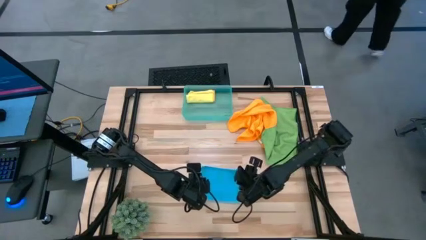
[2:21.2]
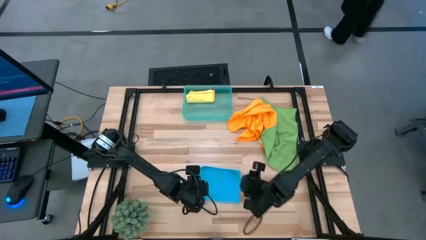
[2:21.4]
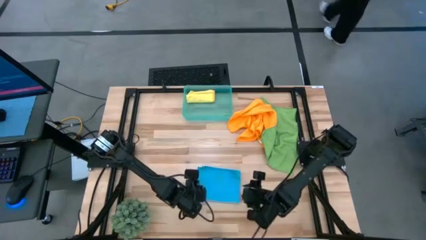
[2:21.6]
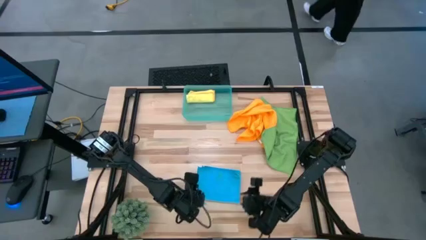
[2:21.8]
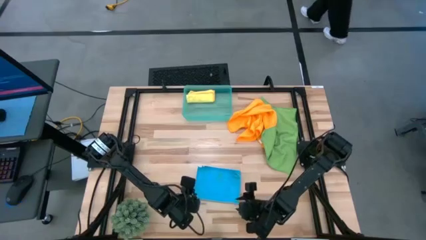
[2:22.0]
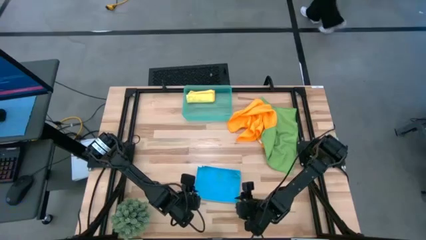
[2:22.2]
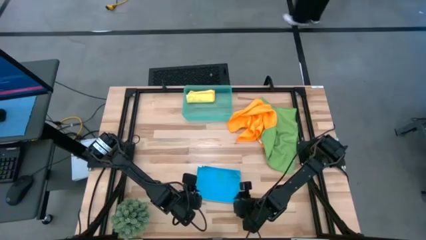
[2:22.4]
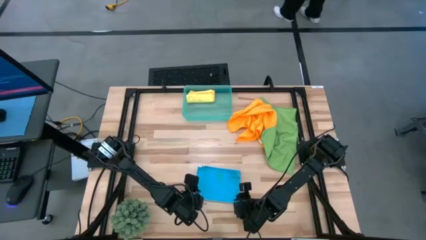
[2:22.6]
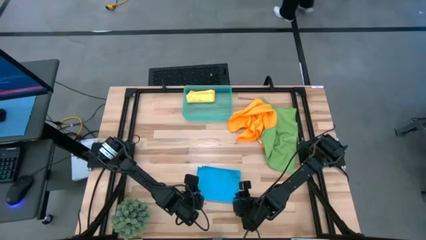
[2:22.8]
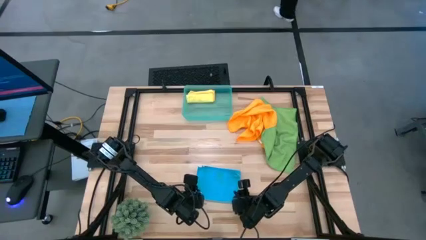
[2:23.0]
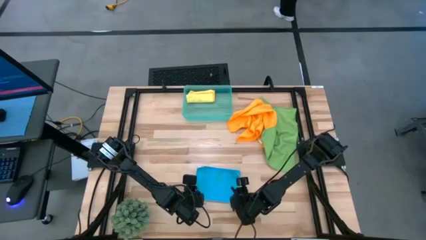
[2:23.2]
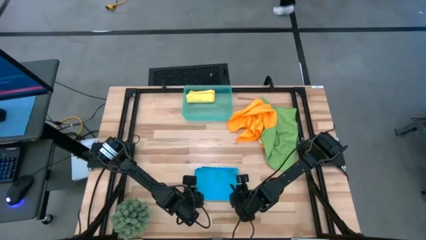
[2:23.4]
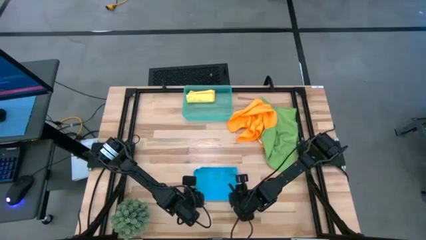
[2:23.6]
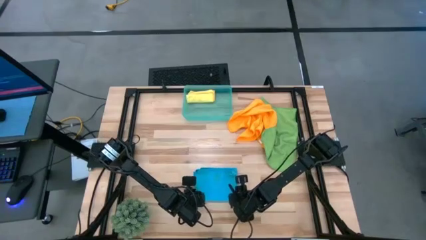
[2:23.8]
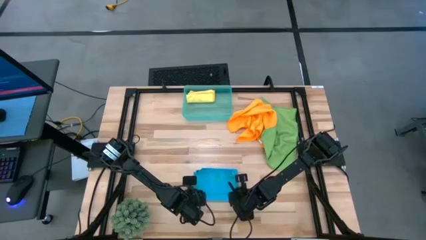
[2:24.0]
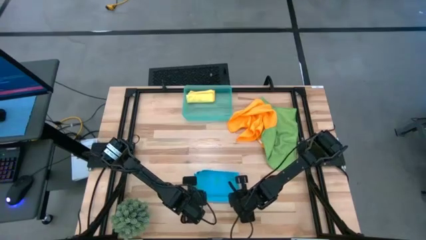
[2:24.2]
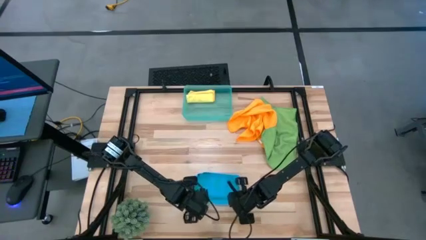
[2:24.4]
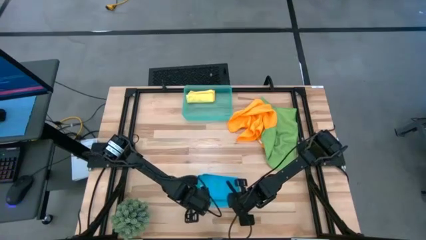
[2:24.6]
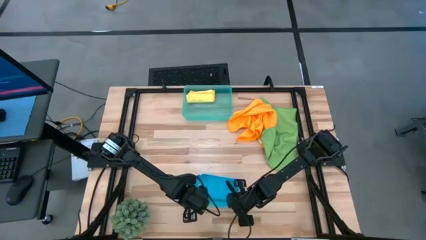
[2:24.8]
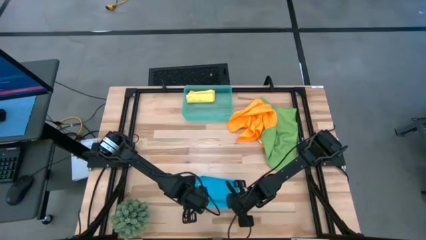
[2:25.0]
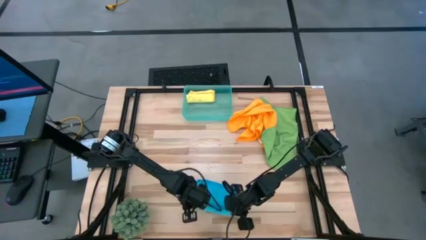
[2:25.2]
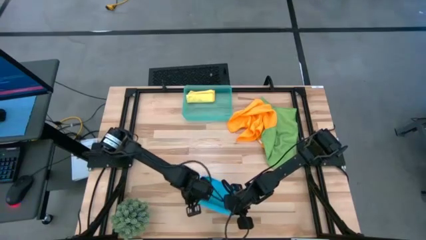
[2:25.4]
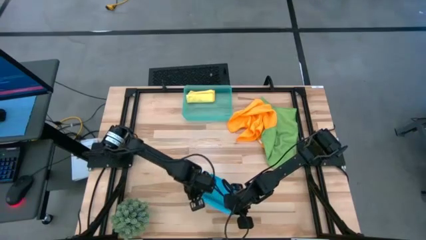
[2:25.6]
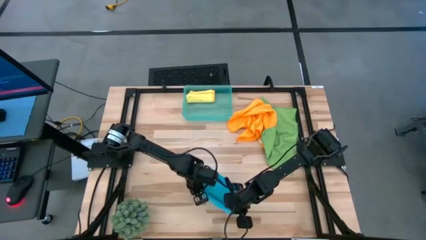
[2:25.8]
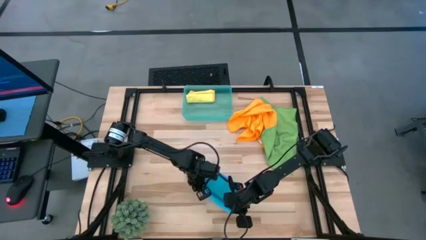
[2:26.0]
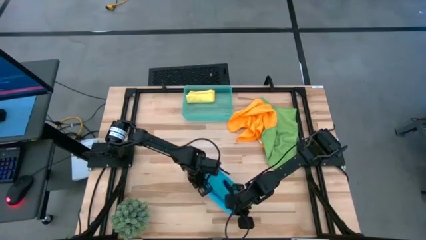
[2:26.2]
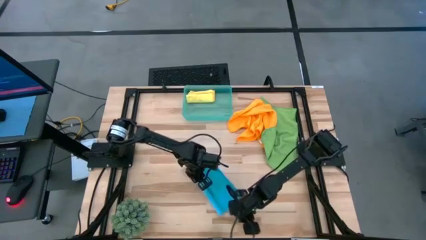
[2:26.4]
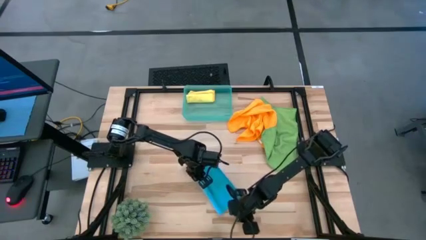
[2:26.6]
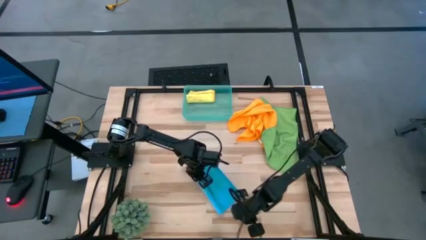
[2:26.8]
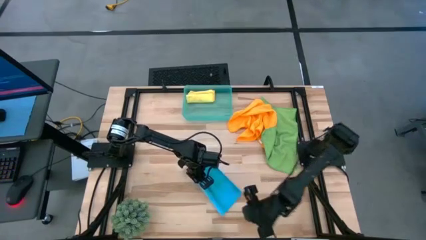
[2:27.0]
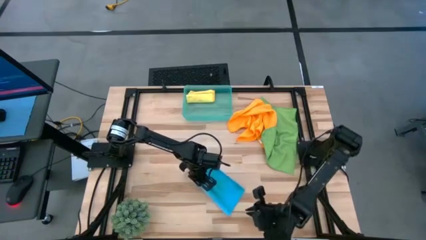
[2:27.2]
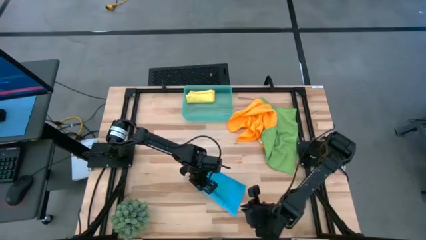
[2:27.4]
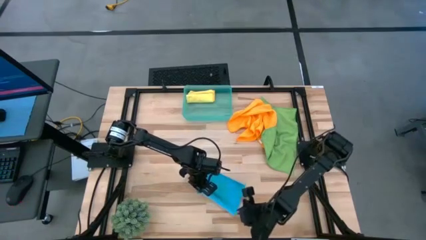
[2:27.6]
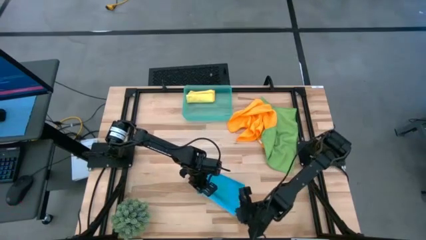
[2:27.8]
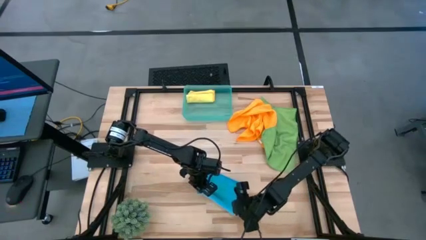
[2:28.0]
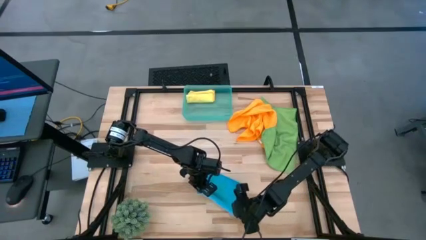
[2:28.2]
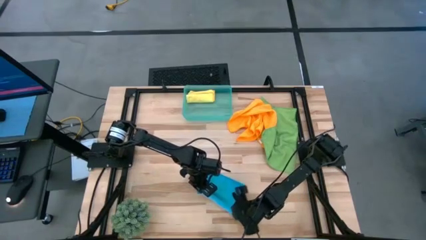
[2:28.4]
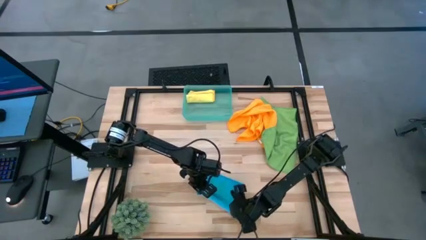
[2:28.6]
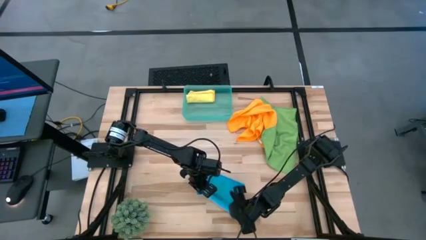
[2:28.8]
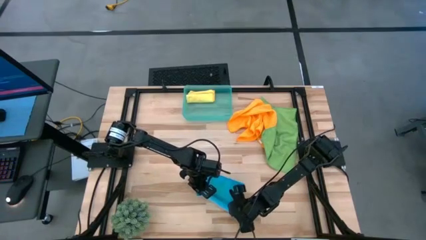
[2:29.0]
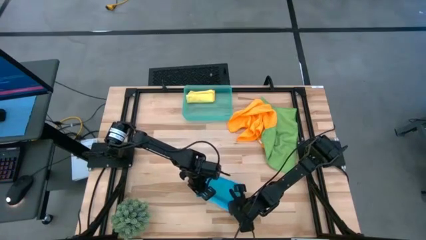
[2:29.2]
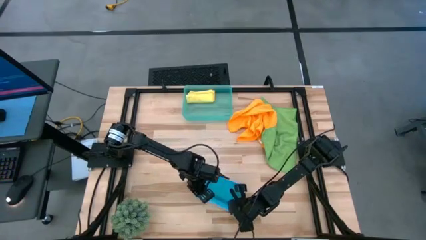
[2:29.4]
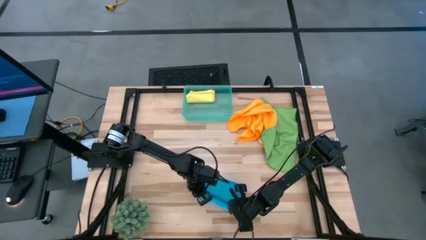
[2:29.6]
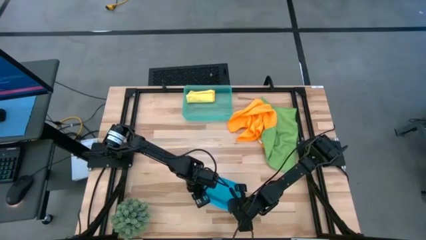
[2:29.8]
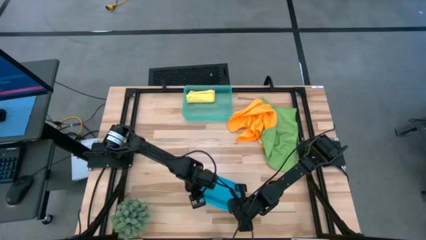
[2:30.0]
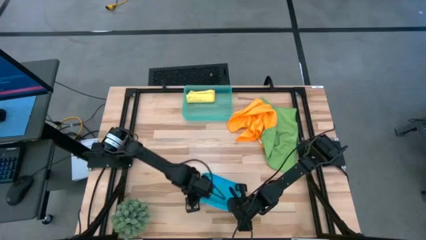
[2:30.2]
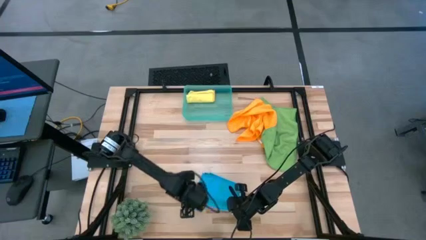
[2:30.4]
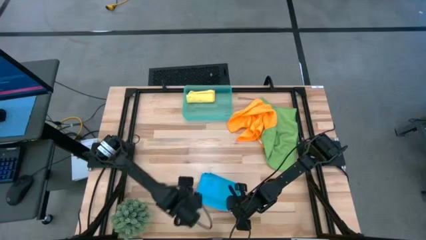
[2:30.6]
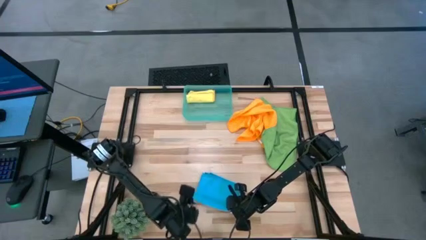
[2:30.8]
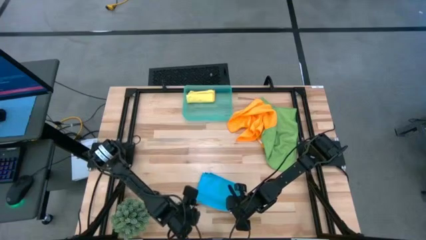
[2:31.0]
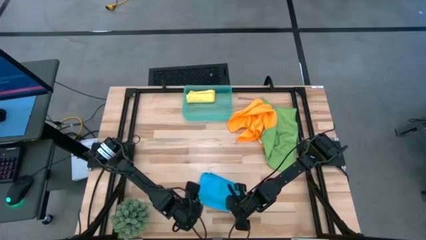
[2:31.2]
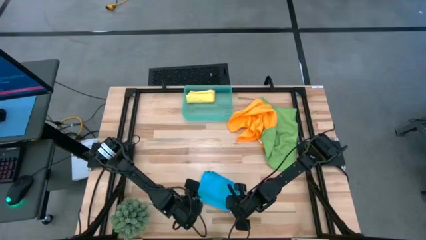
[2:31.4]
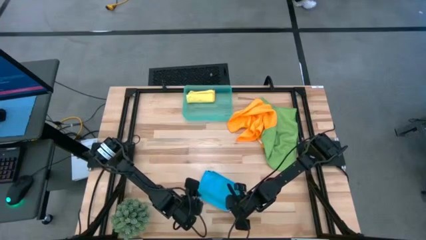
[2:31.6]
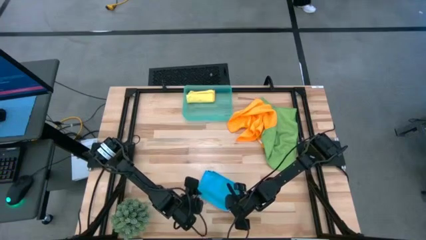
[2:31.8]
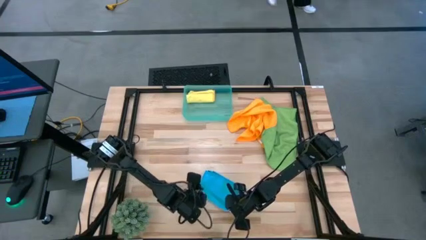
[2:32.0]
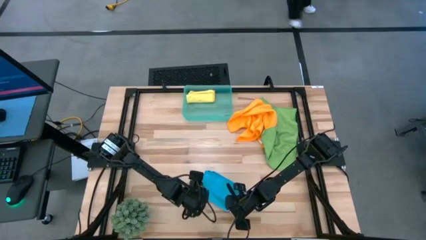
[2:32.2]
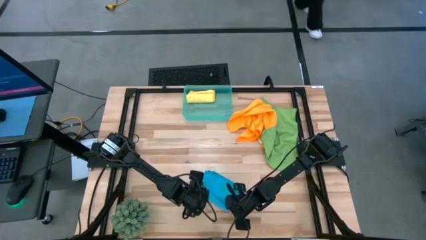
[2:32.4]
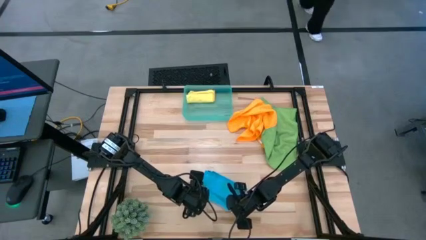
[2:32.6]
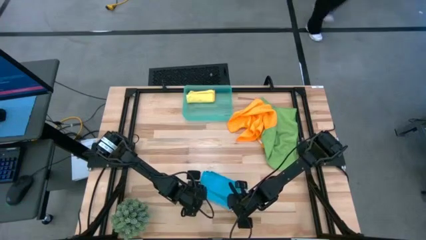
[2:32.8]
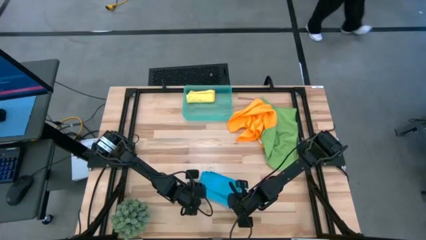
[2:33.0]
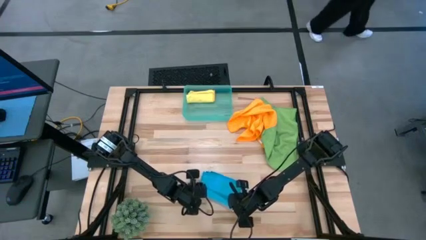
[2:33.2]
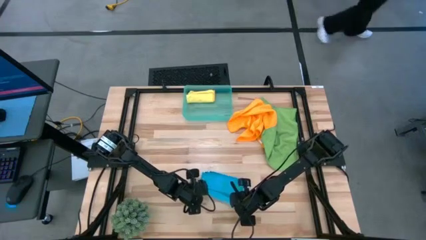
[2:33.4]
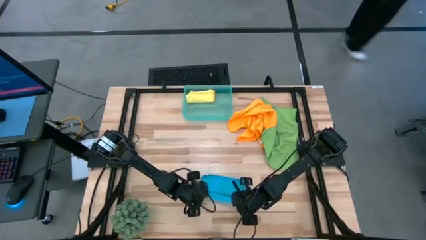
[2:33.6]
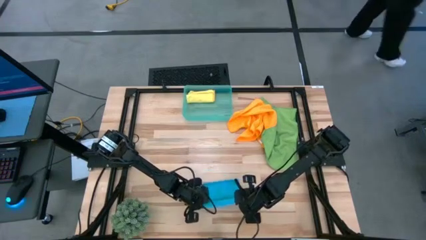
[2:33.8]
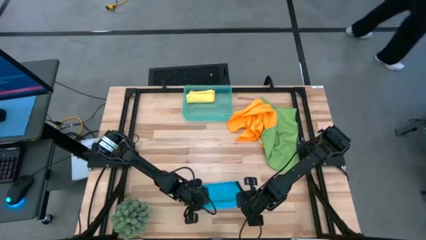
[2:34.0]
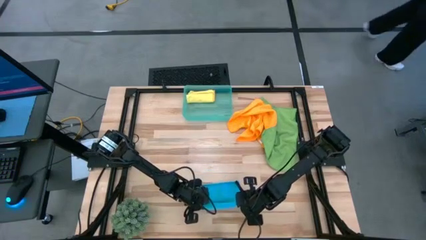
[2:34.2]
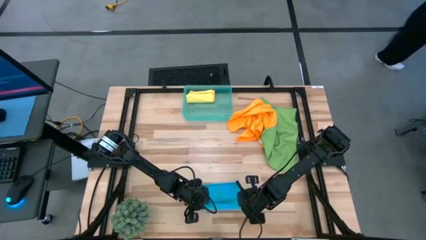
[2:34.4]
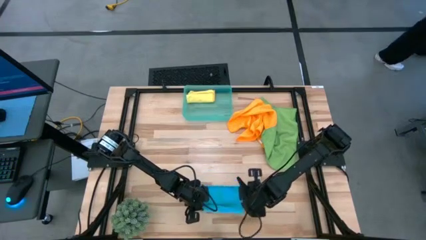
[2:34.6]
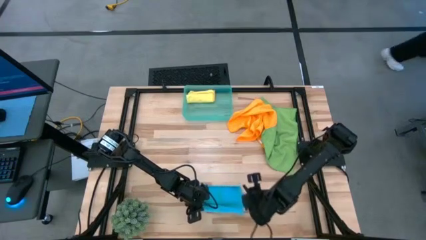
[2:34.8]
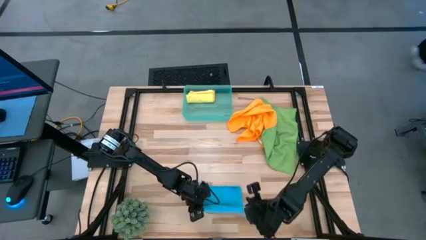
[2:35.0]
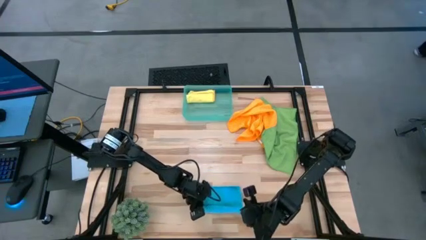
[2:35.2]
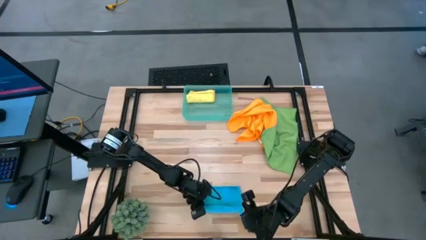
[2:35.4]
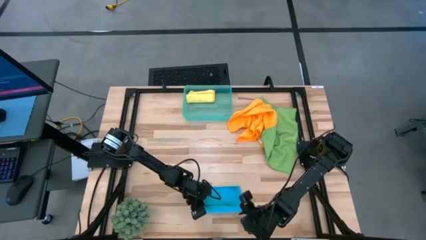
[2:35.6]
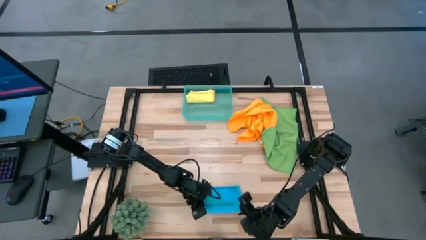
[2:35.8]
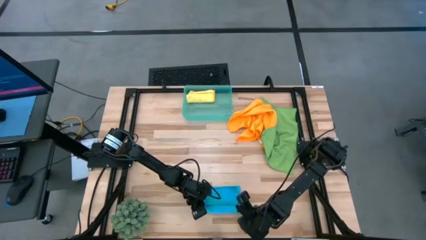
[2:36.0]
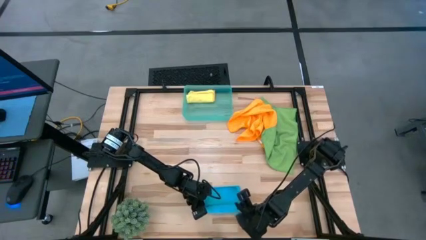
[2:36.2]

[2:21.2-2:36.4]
Task: Roll microfiber towels into tight, uniform cylinder then place into a basket
Roll the blue microfiber towel

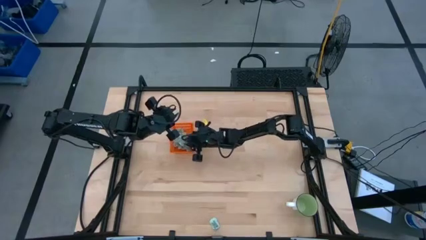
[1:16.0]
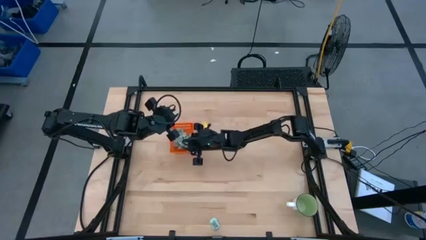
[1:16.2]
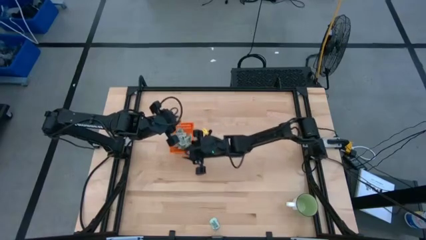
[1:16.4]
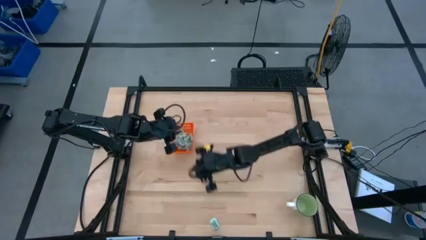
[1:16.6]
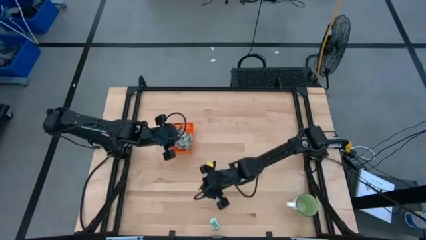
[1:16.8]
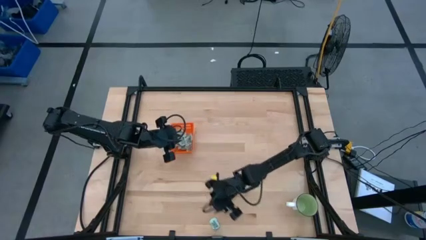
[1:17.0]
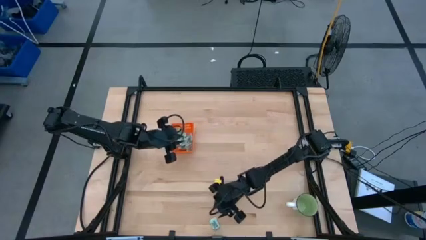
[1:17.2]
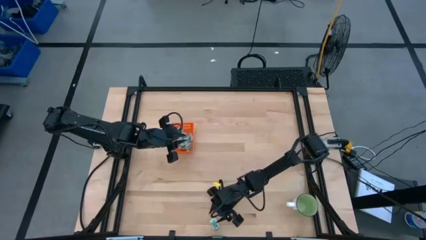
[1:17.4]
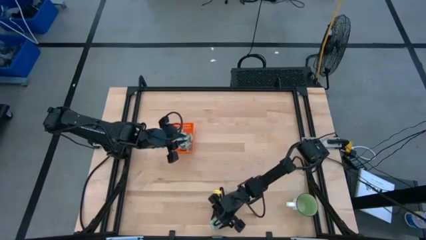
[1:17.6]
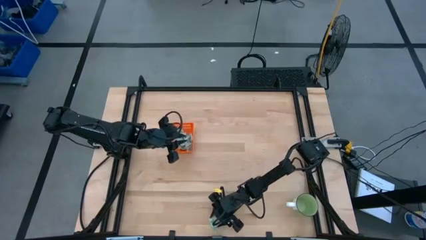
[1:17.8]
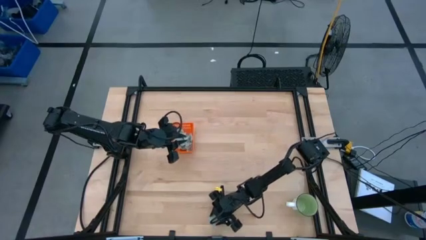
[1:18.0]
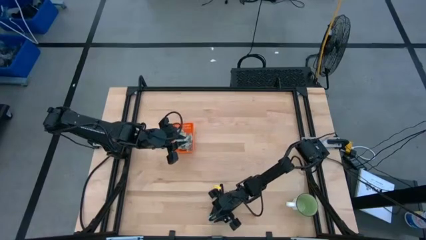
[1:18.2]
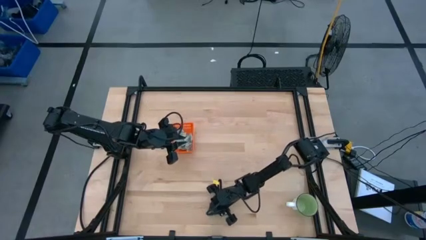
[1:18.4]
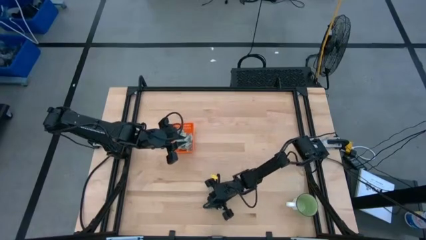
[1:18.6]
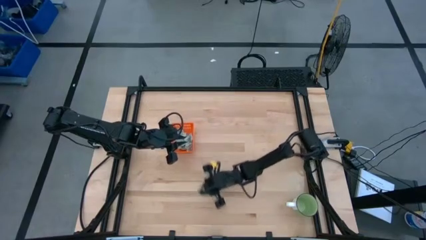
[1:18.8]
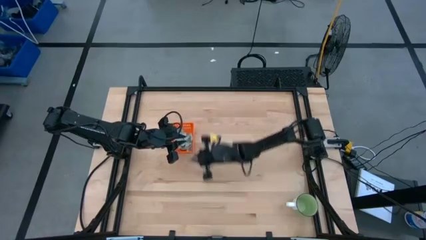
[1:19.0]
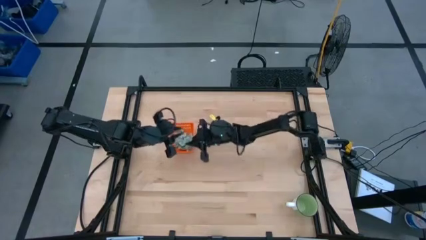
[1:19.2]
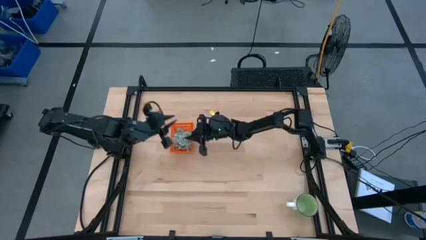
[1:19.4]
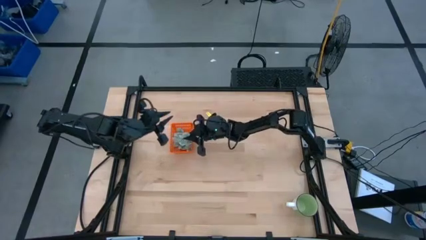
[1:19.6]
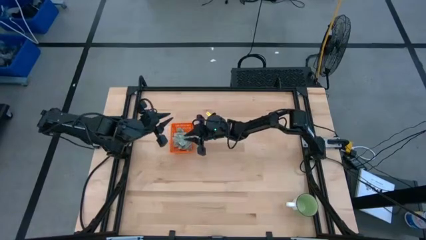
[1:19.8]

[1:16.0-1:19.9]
Task: Pick and place Stevia / Truvia into bins
Put the green stevia packet into the orange bin
